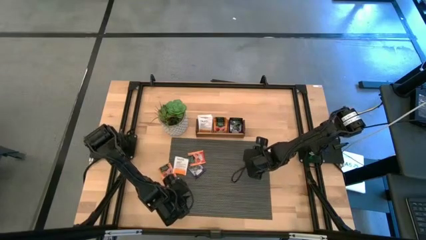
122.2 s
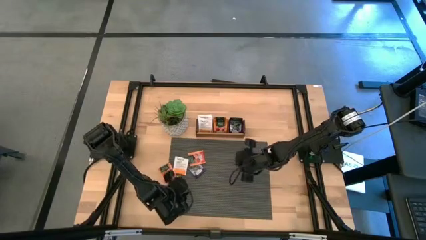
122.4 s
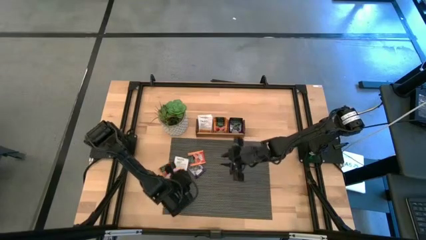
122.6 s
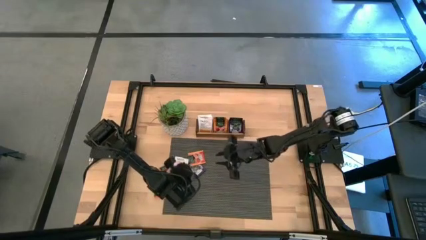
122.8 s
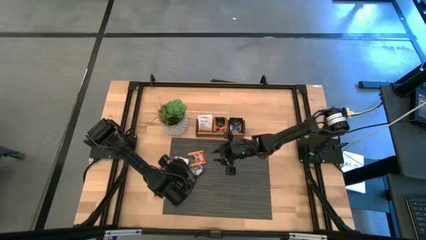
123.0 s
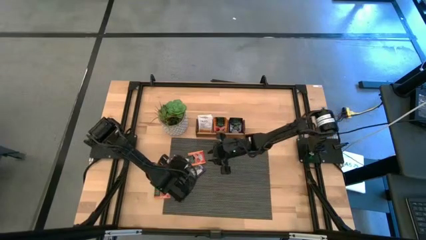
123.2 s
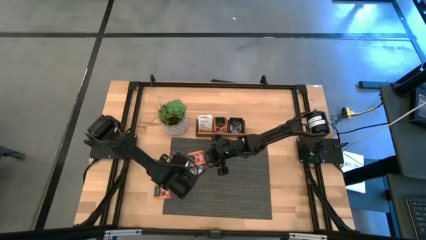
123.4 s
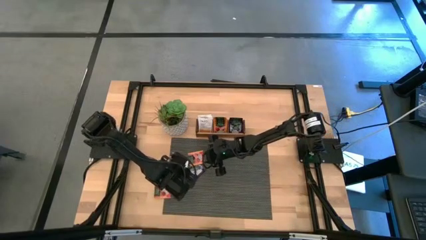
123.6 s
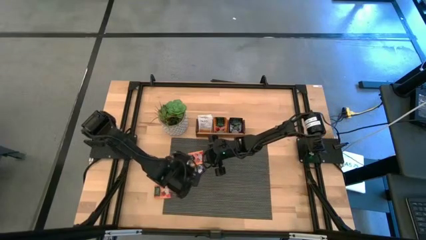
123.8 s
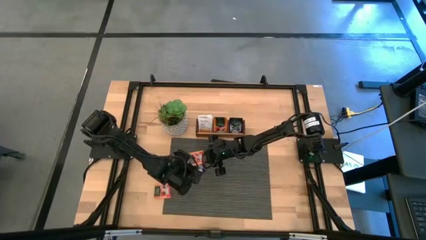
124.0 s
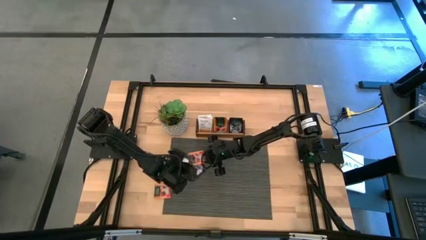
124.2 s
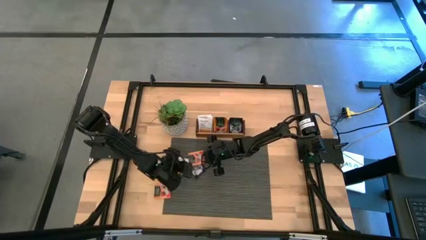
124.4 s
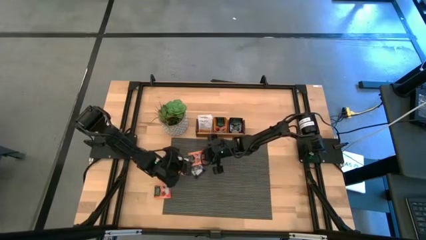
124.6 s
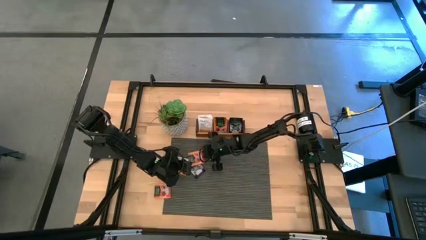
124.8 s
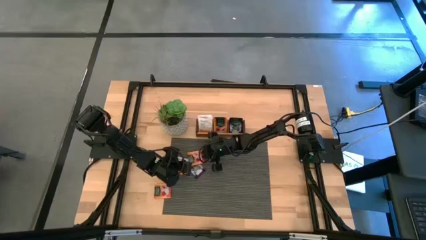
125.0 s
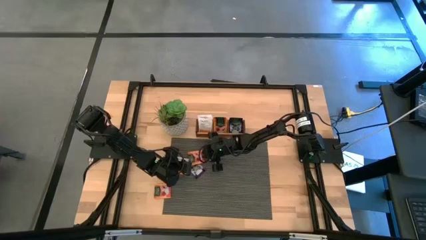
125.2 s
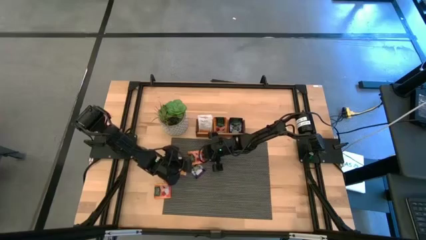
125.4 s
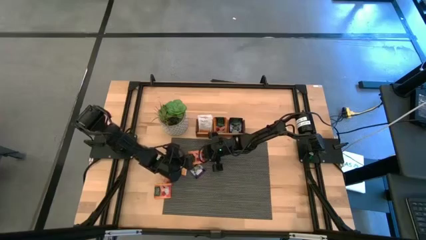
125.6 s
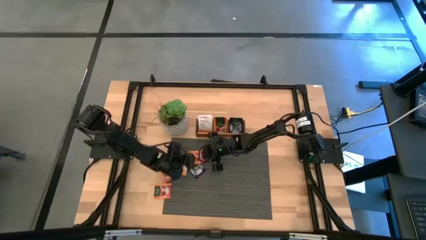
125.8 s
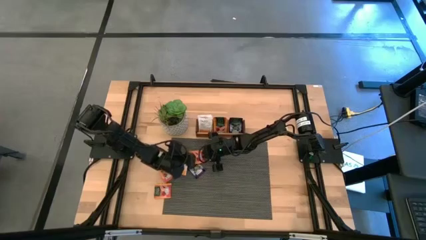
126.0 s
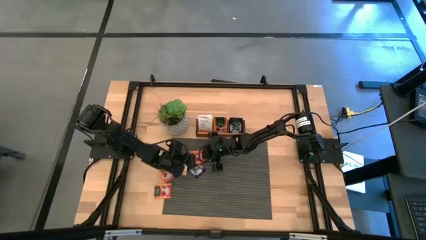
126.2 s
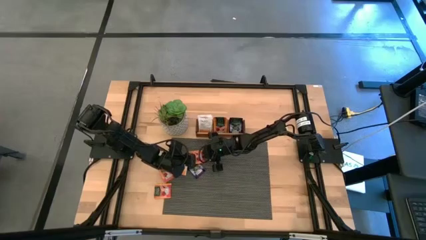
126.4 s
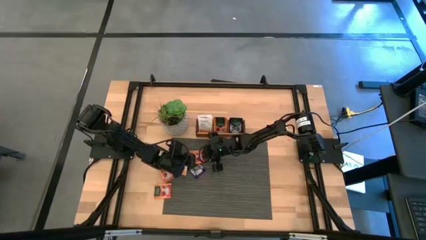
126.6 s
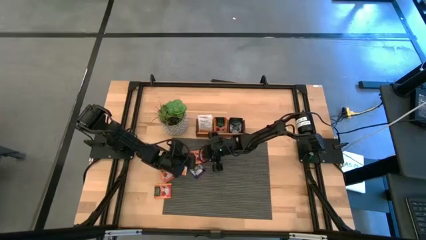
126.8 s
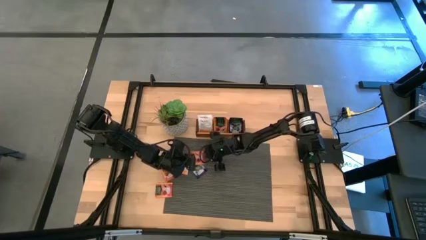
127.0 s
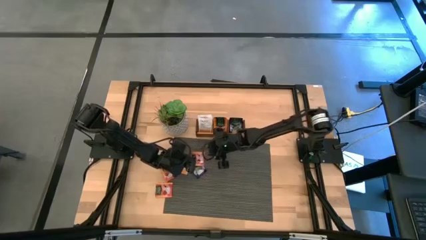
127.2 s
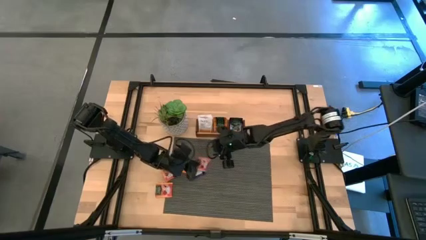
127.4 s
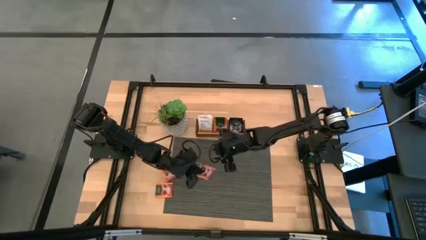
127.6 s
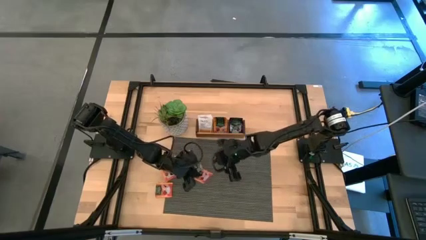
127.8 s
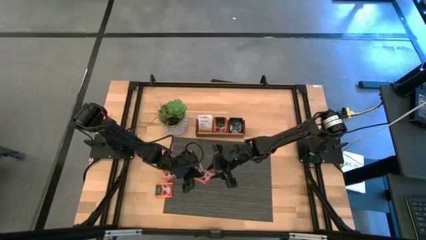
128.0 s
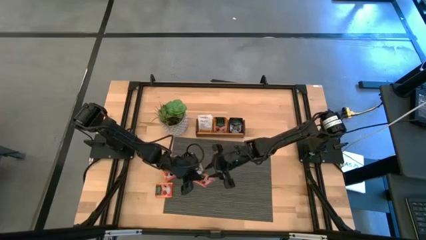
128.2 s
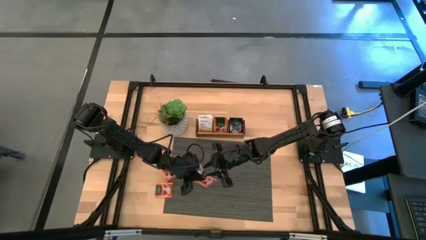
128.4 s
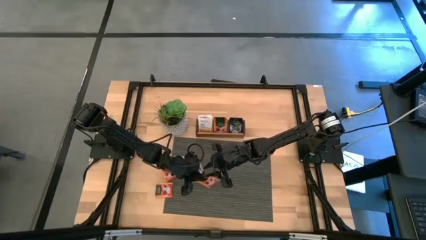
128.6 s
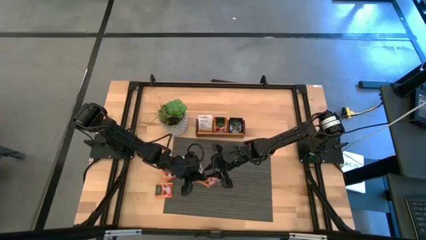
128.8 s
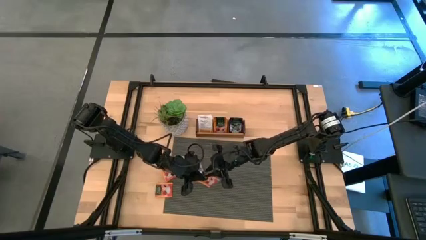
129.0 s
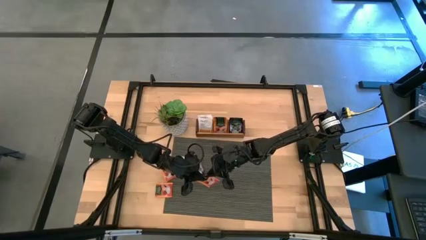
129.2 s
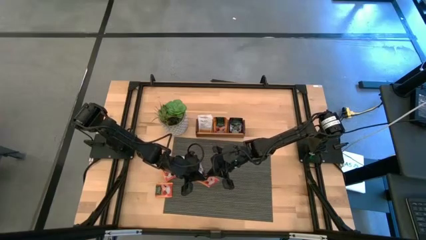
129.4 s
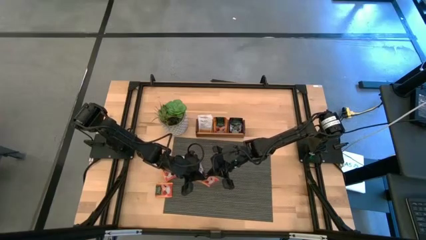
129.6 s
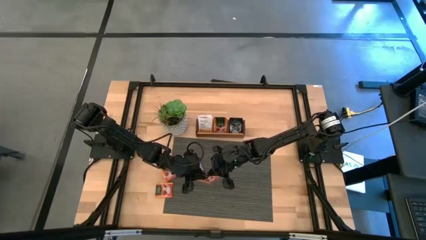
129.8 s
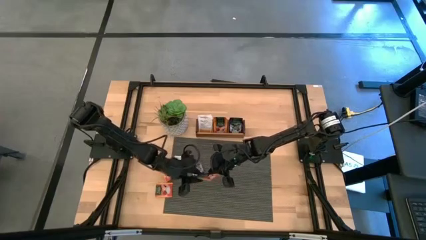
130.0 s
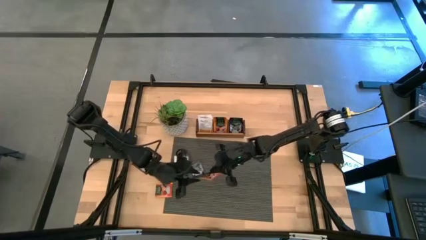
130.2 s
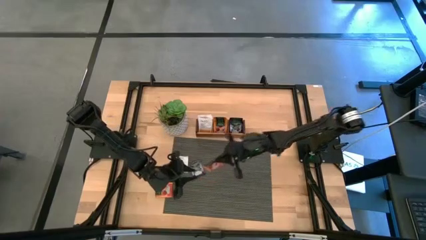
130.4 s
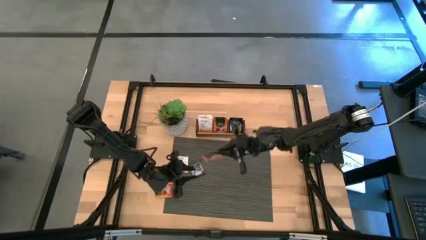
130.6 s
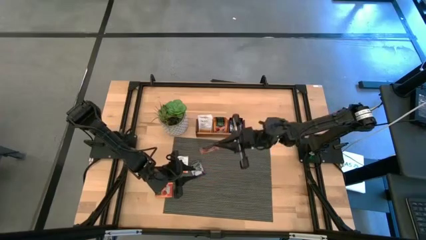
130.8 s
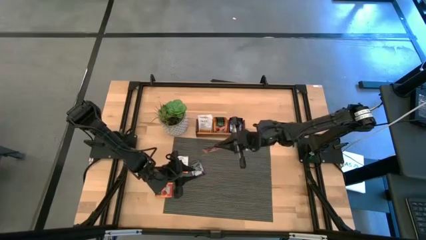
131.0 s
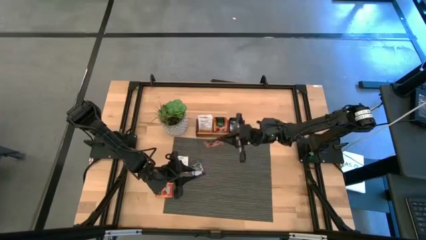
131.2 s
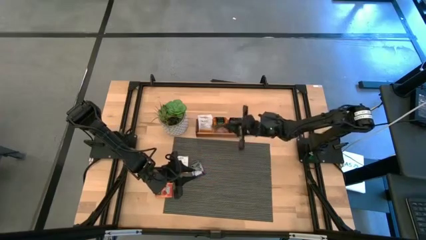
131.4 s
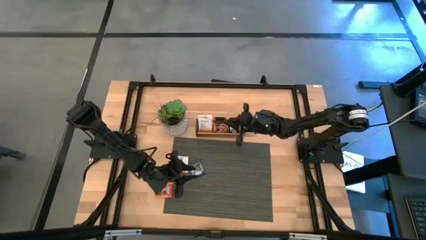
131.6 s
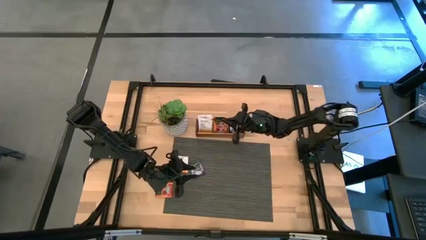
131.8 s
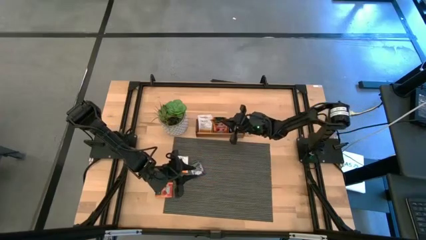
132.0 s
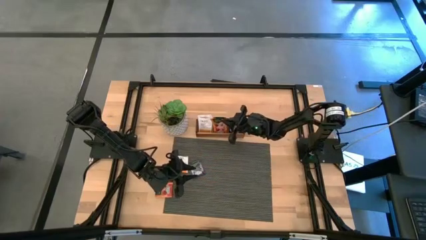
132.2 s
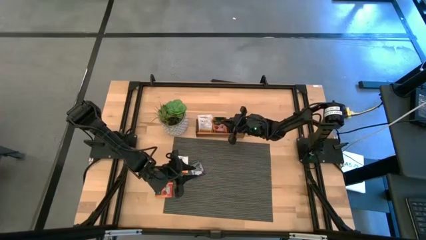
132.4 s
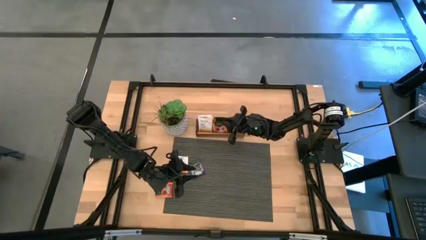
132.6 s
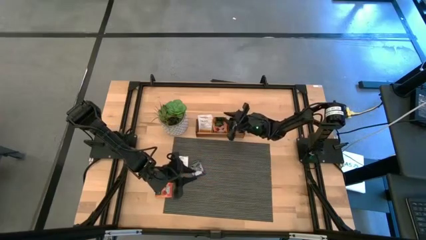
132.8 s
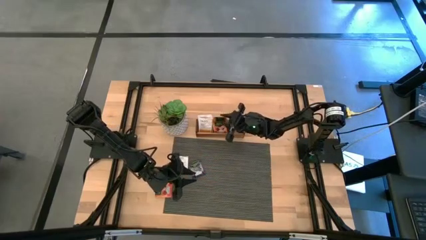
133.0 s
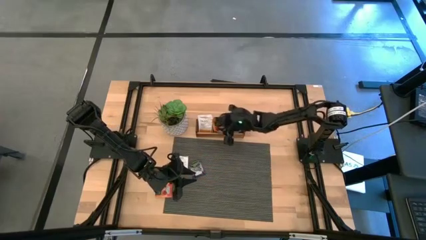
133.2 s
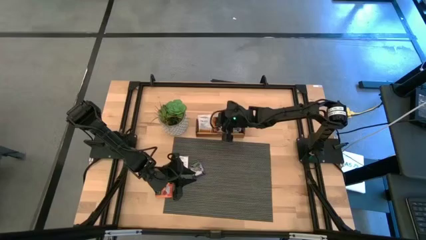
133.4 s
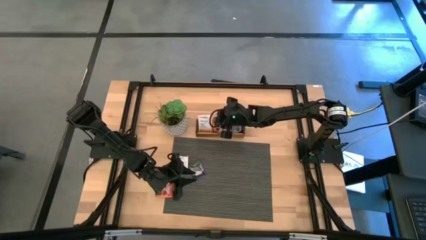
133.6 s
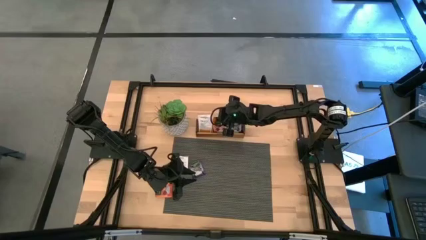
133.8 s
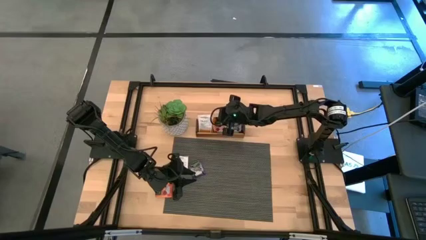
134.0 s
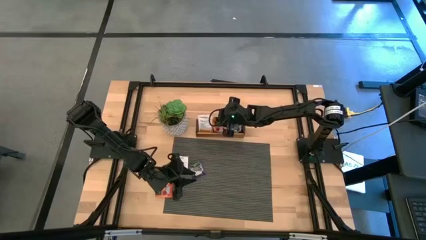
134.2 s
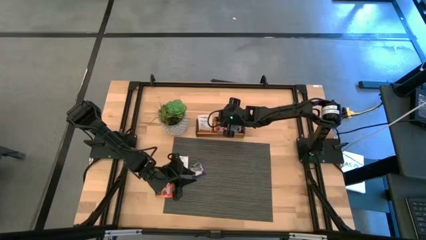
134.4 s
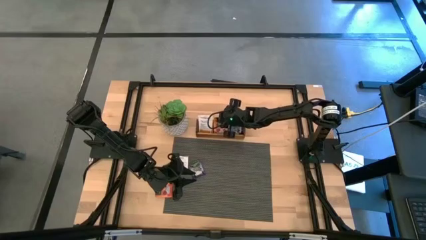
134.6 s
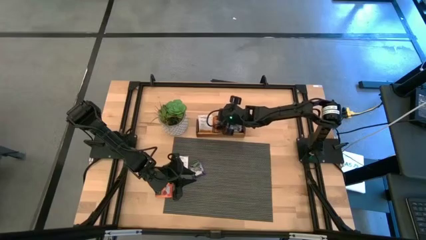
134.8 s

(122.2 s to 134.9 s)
Task: Pick & Place Tea
Put the orange tea bag into the middle section of the wooden organizer

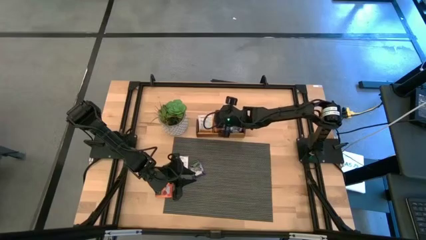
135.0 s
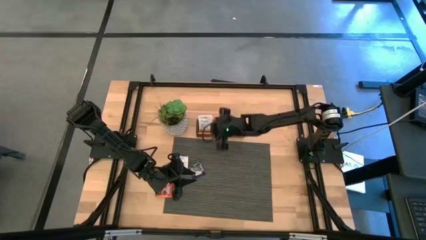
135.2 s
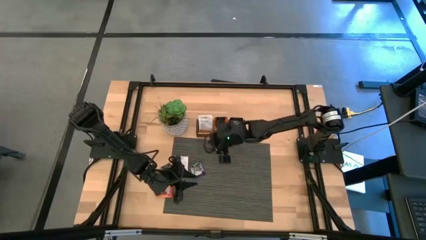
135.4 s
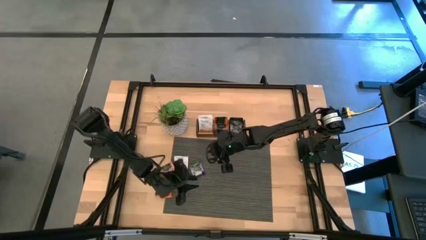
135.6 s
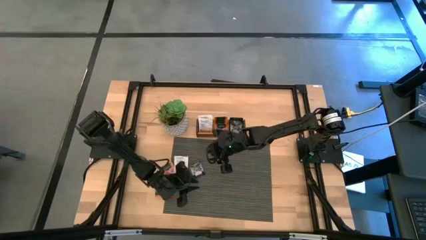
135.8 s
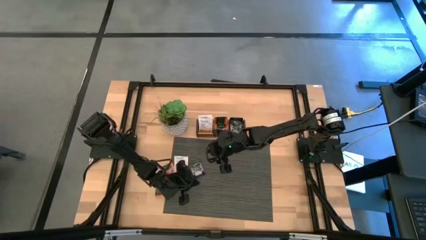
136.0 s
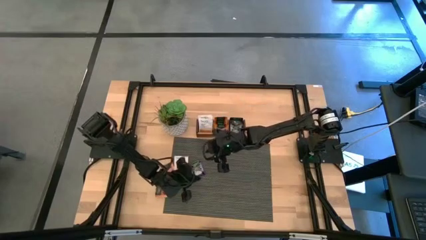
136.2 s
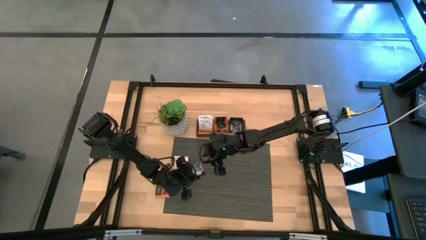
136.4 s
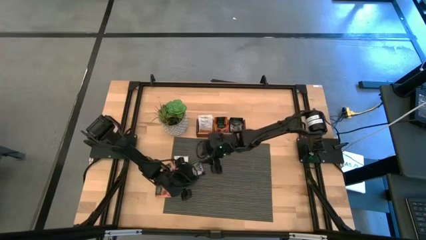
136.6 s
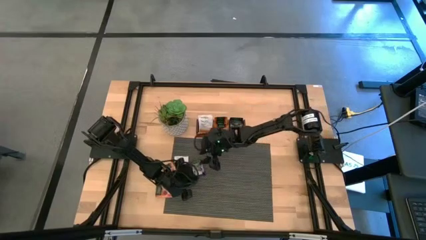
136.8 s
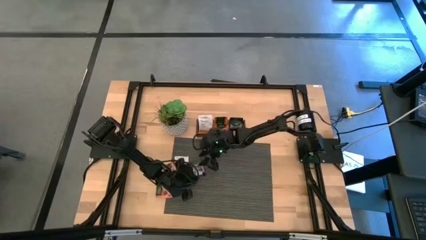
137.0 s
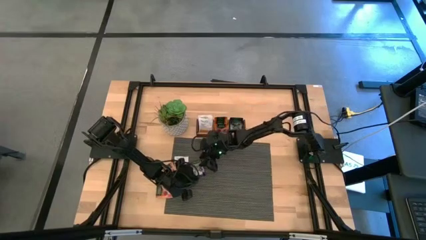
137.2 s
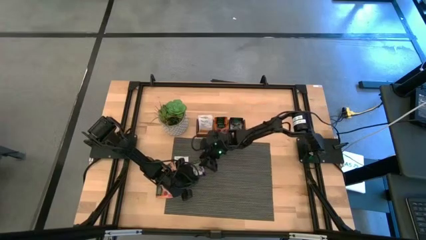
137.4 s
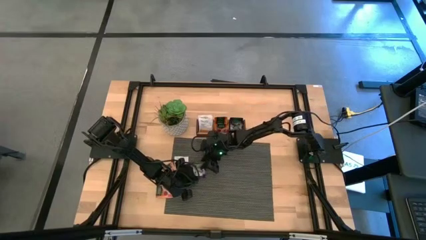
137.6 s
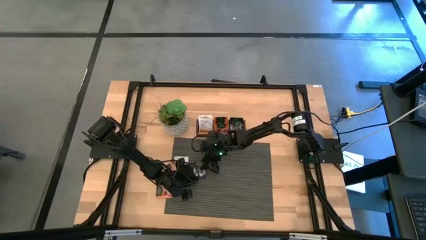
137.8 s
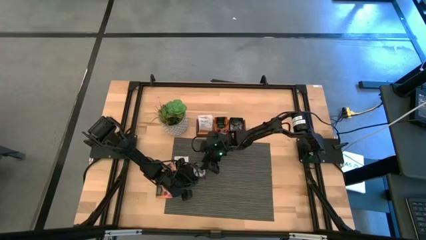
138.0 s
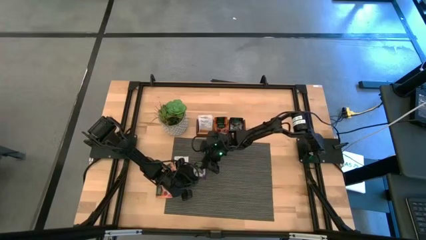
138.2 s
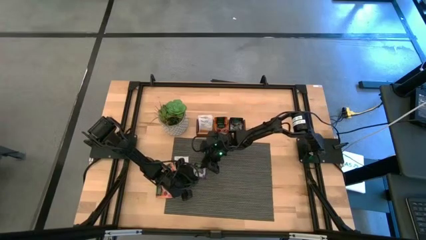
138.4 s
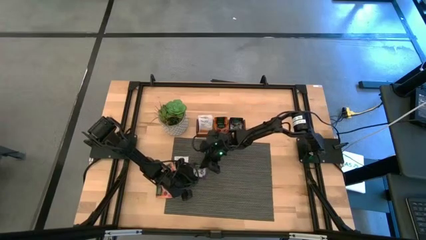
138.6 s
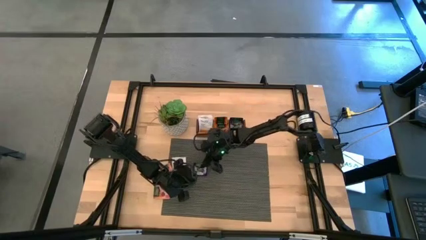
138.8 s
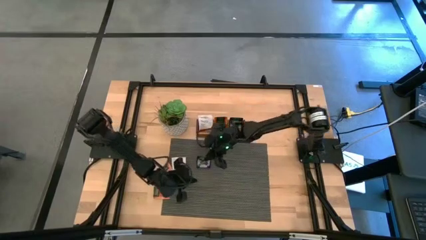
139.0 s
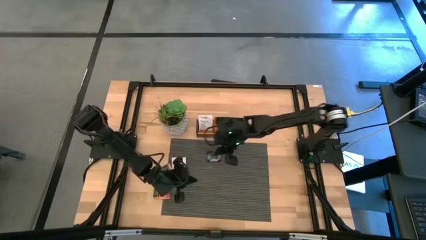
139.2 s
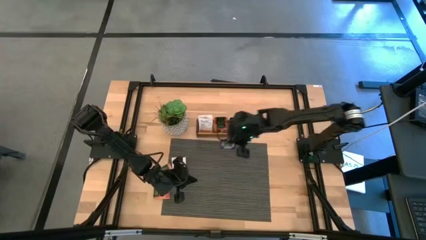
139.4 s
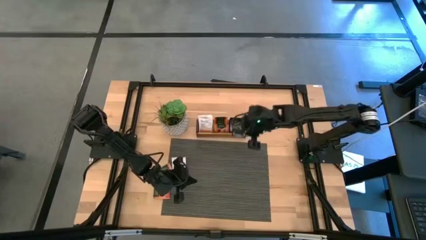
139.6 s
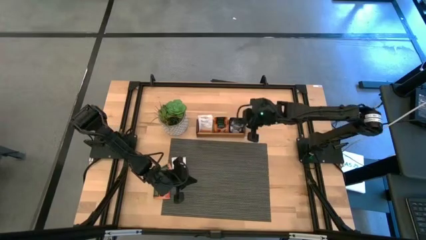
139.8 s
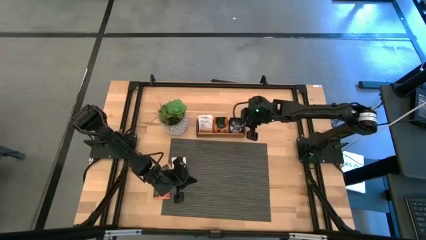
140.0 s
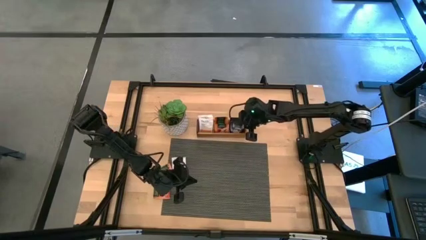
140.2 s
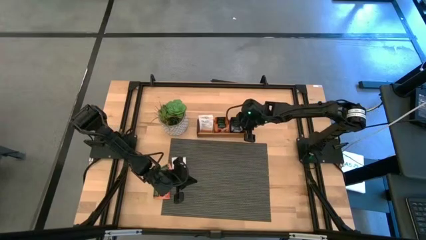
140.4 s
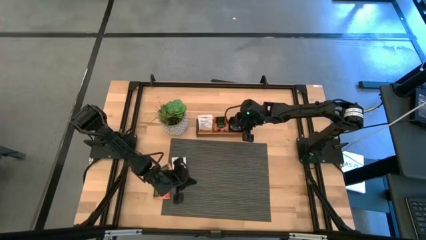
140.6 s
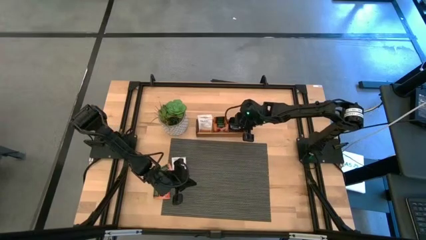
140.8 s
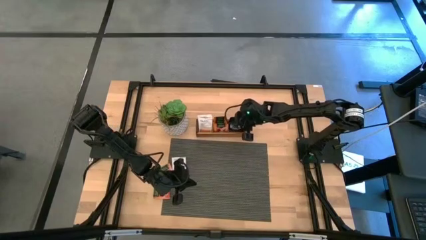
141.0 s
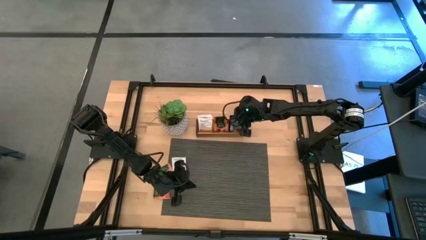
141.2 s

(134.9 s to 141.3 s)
Put the blue tea bag into the right section of the wooden organizer
